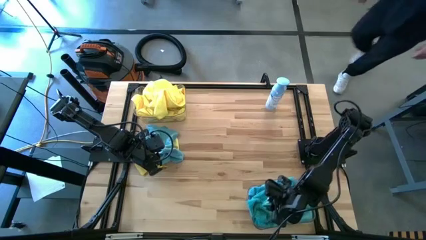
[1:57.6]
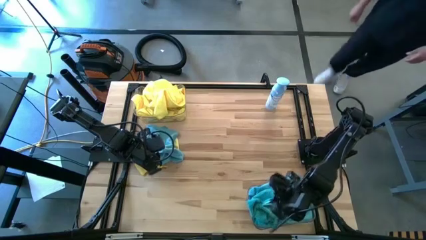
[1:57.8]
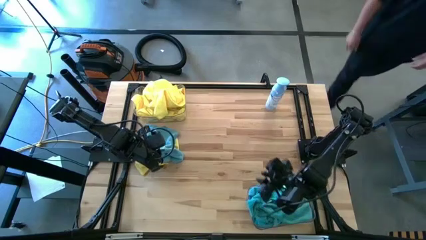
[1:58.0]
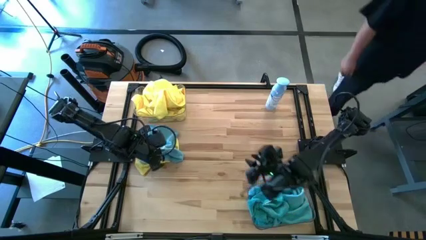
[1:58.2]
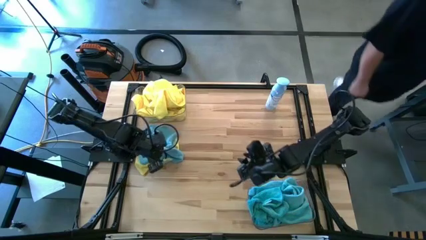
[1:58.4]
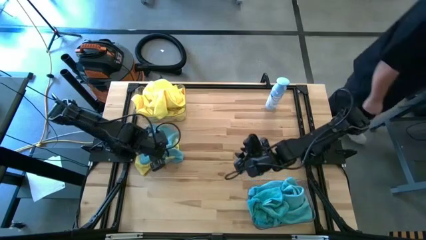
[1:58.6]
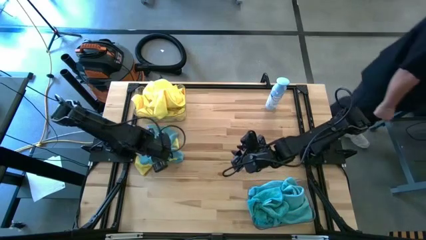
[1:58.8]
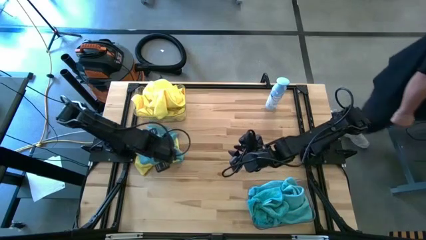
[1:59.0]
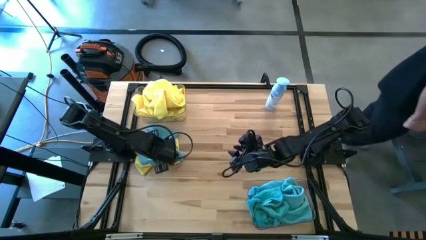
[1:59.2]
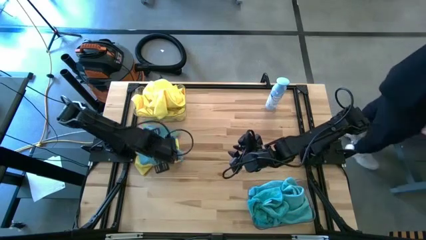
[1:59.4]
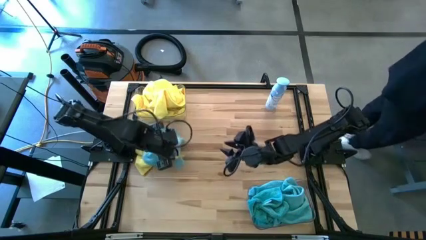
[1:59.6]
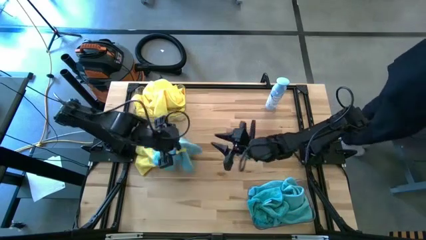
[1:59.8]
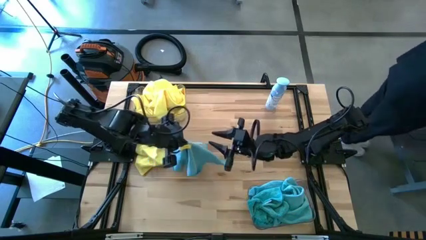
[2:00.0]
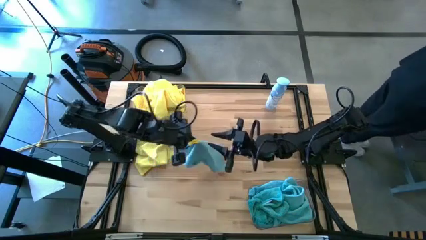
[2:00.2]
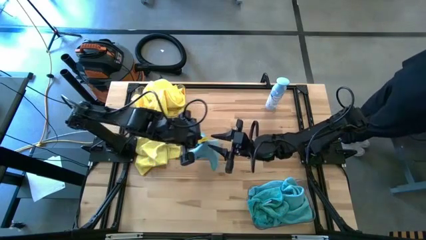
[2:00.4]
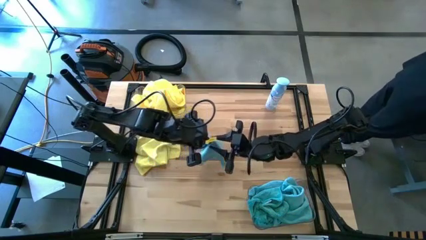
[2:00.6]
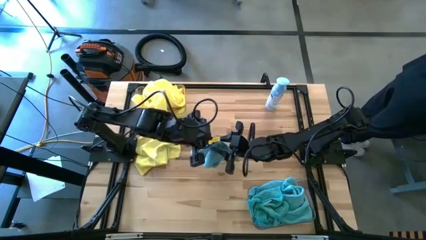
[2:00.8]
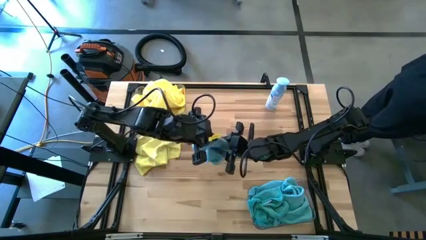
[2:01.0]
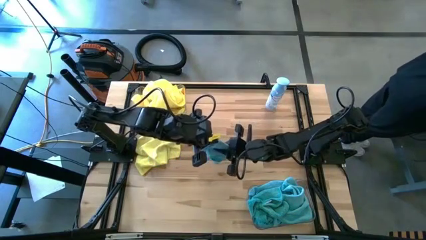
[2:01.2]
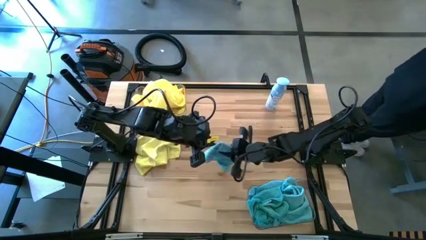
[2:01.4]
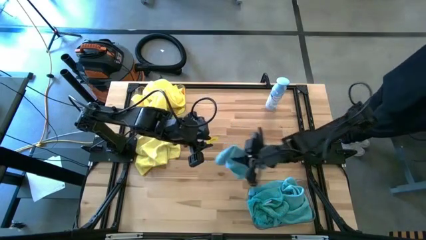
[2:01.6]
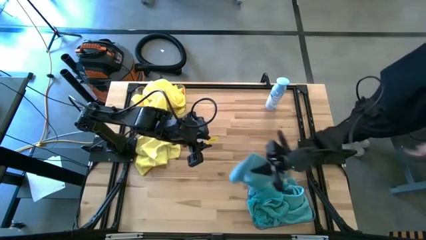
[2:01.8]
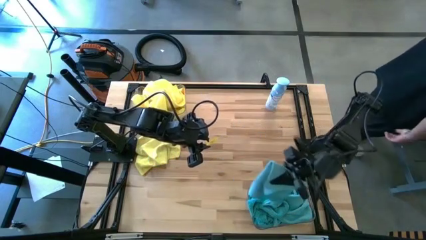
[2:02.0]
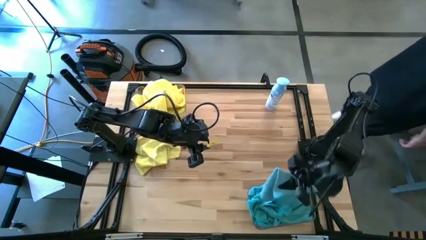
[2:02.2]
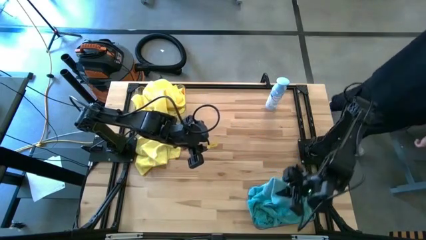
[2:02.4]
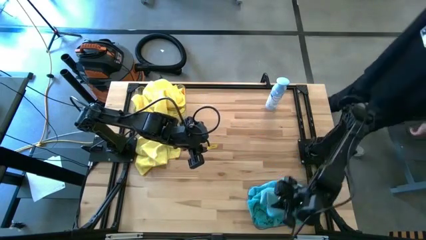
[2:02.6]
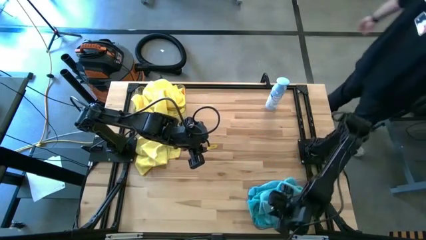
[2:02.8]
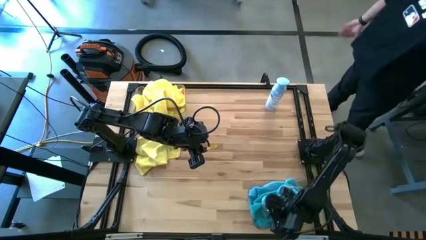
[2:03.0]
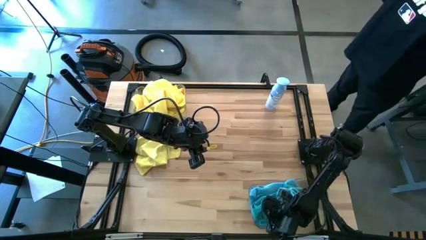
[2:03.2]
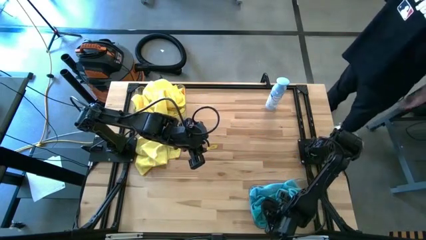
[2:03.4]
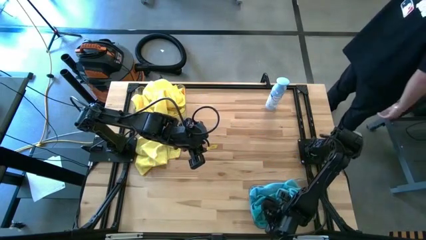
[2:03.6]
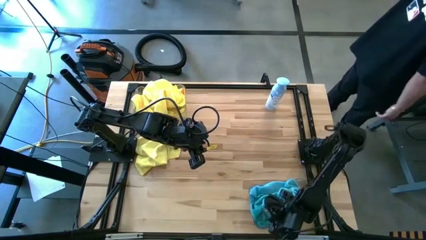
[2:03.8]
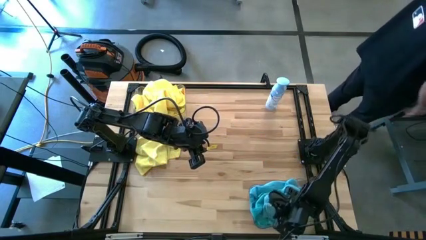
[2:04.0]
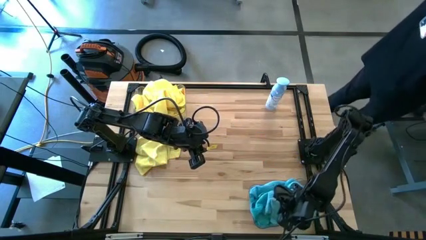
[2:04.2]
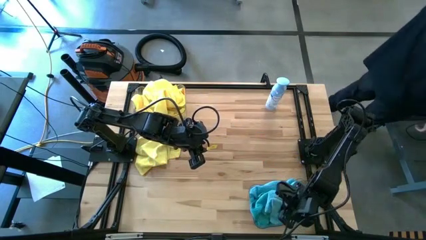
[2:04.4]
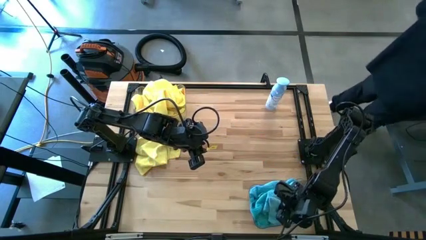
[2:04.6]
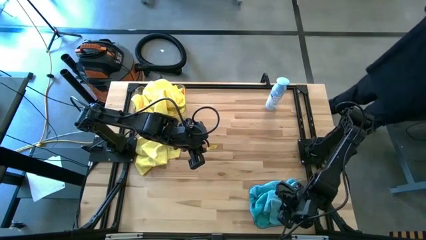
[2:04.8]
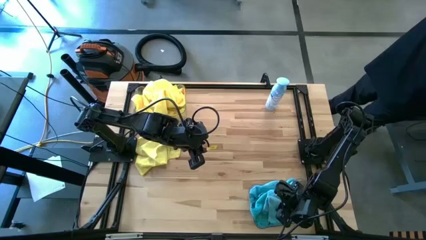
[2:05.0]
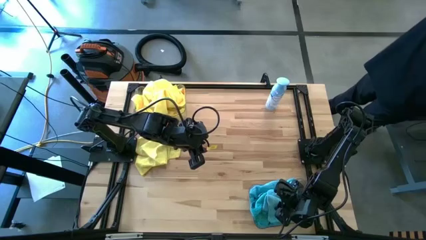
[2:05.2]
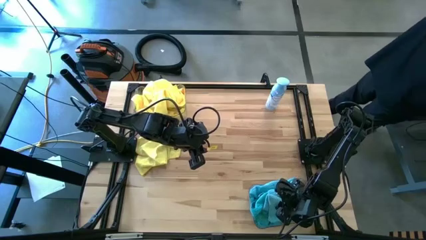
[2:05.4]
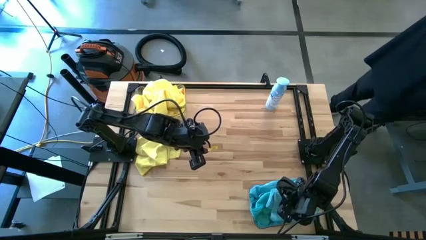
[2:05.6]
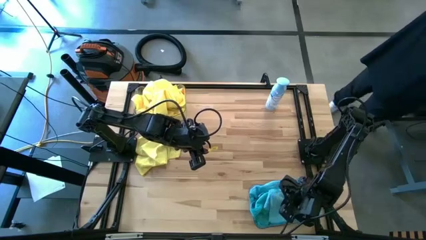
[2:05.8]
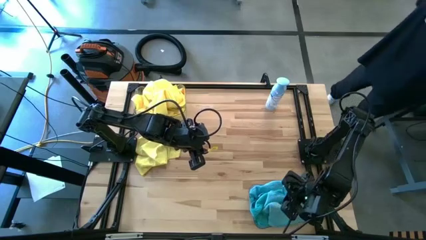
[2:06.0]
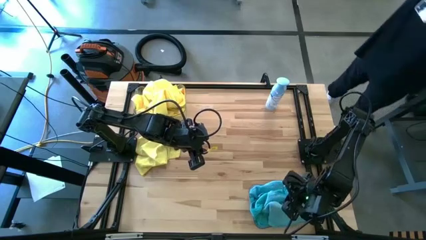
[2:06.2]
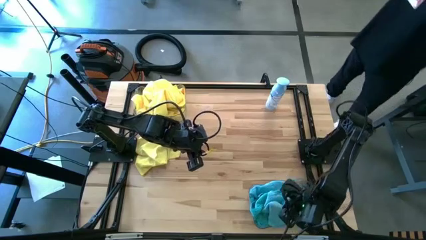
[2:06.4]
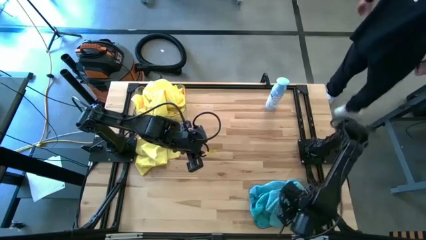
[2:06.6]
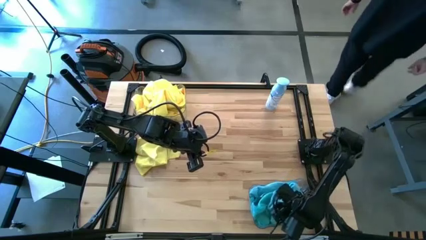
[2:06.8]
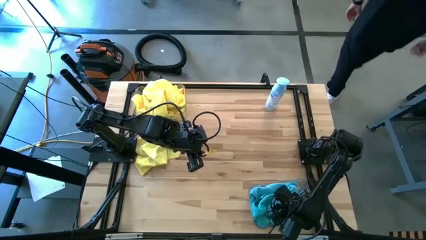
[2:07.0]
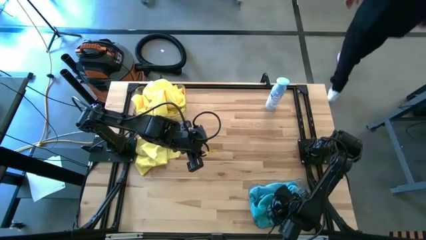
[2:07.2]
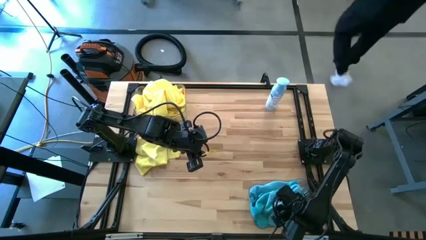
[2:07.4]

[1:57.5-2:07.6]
Task: Sort microfiber towel by color & place in baskets
Put the blue towel into the bottom transparent bin

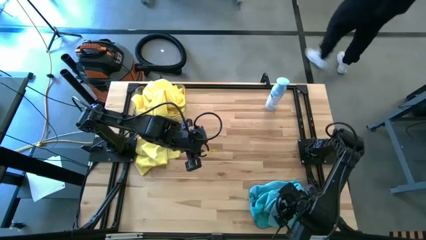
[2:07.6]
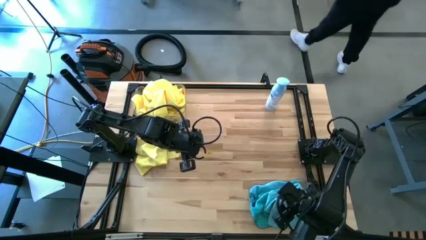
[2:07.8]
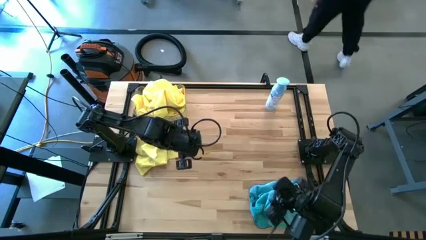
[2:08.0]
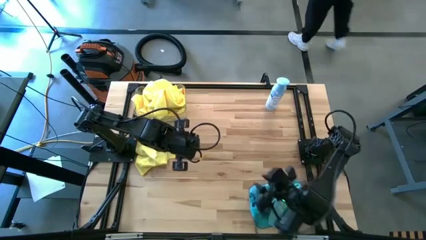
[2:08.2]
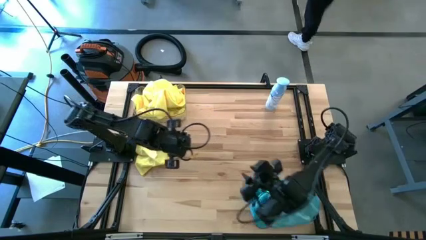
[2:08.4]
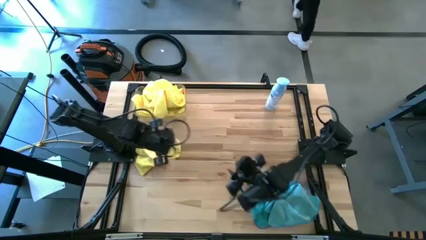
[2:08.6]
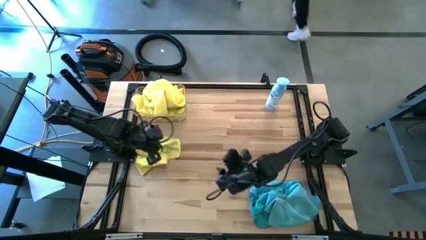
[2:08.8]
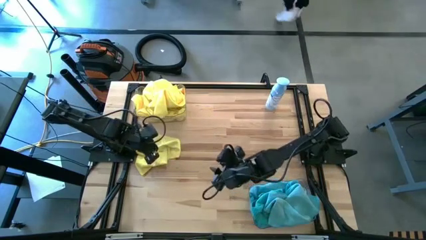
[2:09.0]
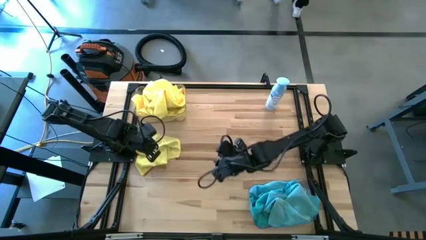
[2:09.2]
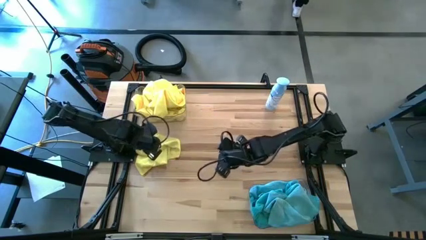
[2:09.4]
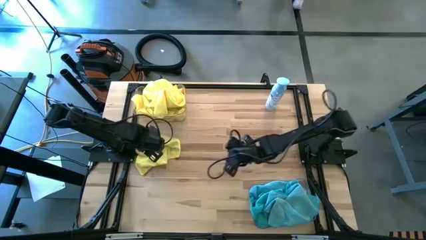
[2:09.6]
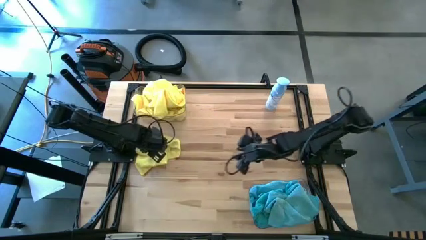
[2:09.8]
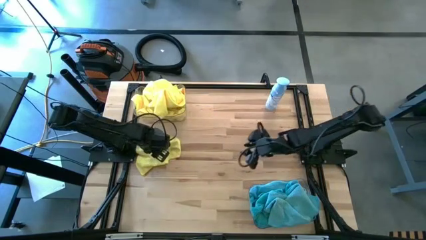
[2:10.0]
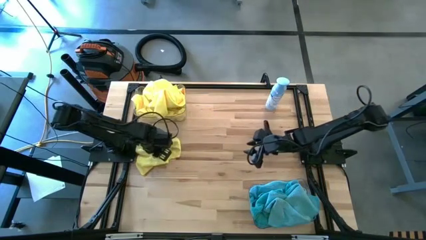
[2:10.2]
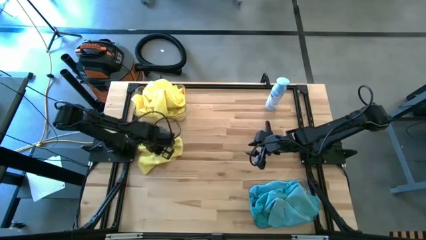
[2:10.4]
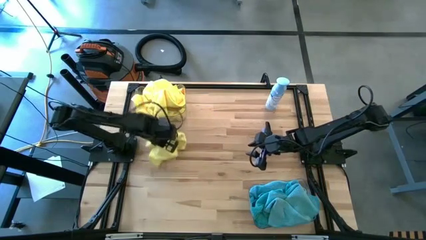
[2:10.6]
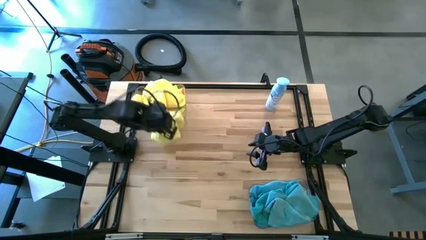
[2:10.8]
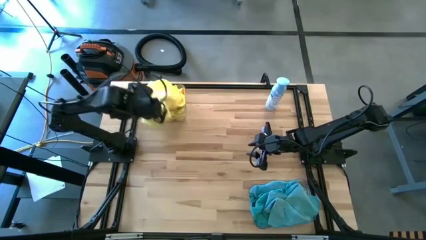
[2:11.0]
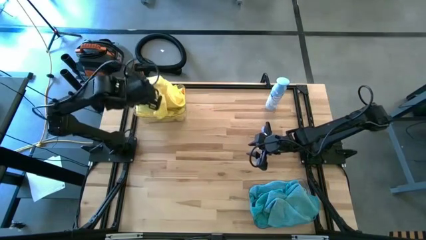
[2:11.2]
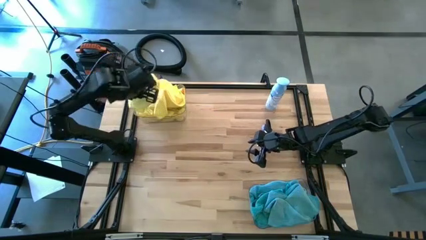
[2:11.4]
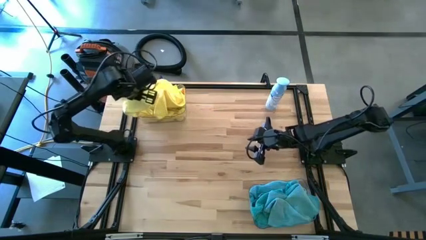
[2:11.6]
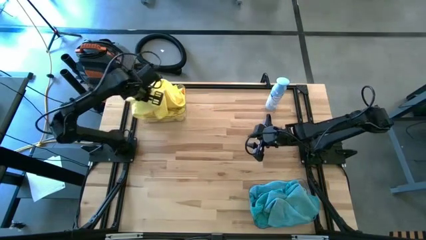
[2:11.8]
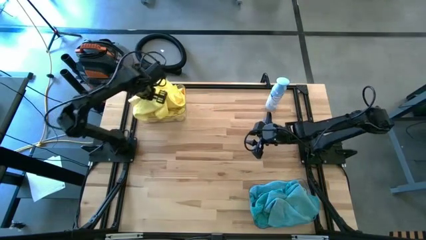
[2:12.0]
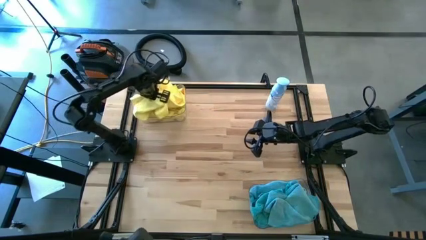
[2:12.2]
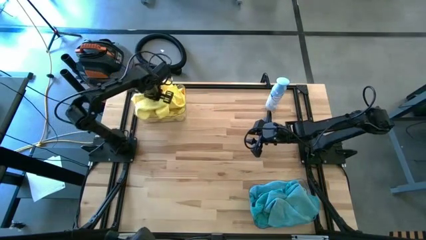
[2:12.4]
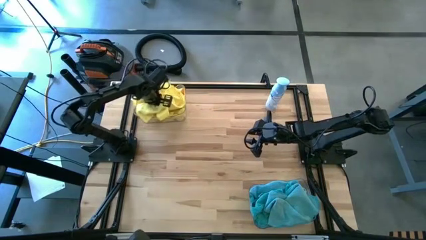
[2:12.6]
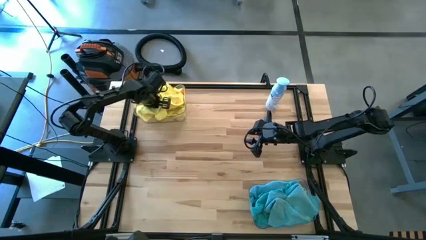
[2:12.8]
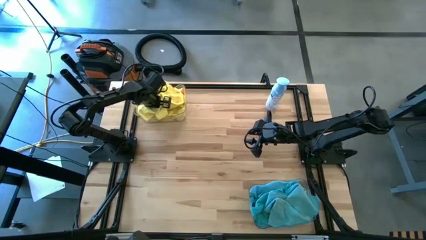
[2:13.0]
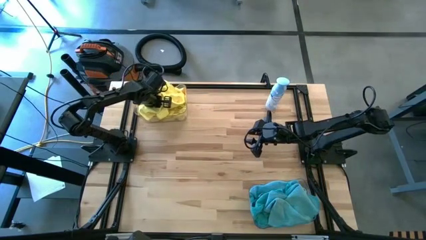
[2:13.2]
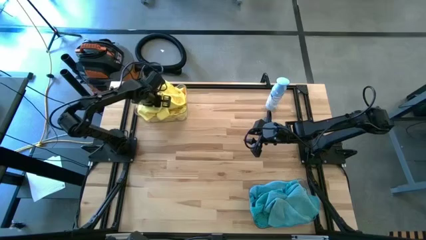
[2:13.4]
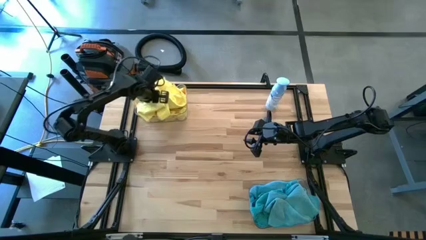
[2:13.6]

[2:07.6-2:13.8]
Put the yellow towel into the top transparent bin

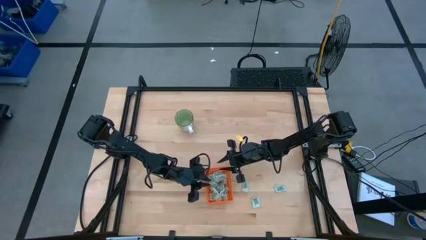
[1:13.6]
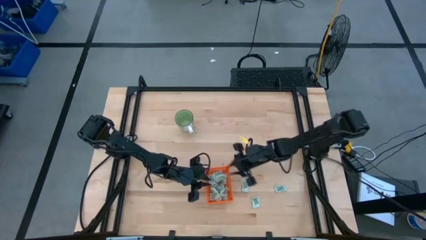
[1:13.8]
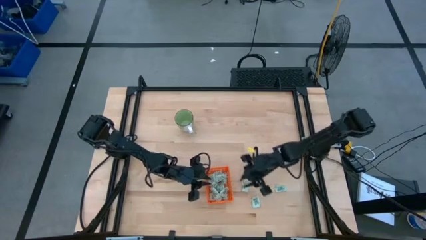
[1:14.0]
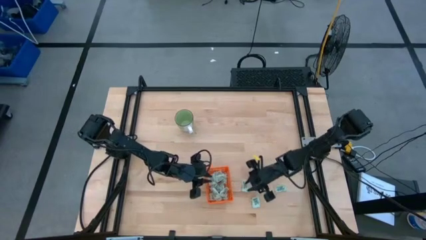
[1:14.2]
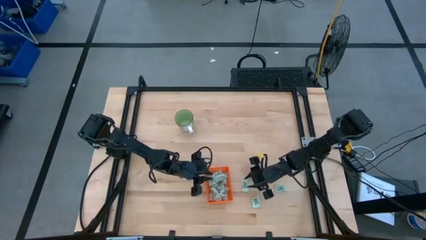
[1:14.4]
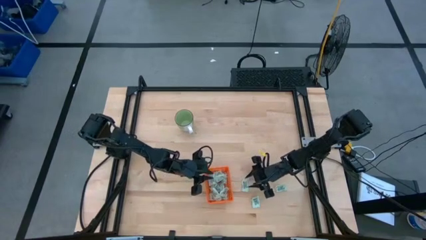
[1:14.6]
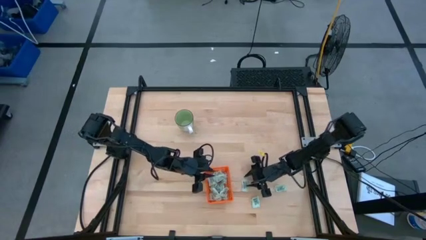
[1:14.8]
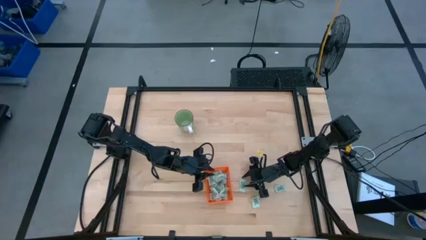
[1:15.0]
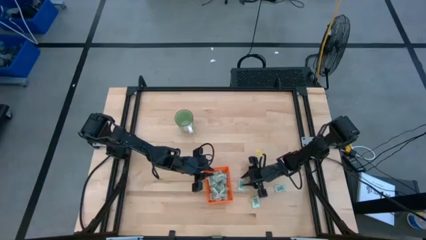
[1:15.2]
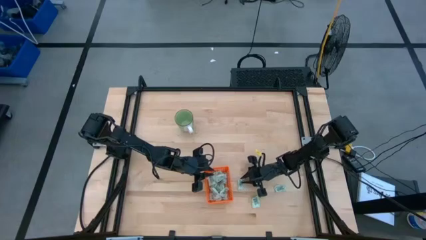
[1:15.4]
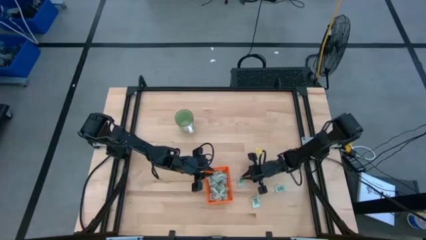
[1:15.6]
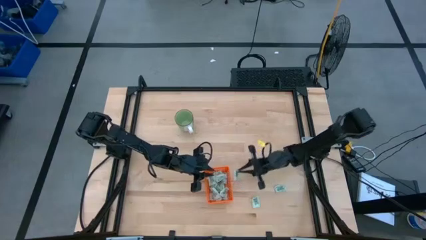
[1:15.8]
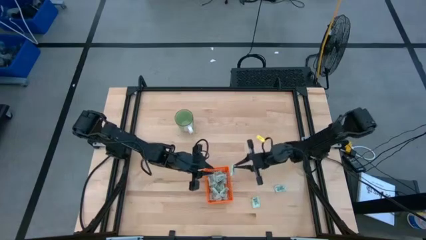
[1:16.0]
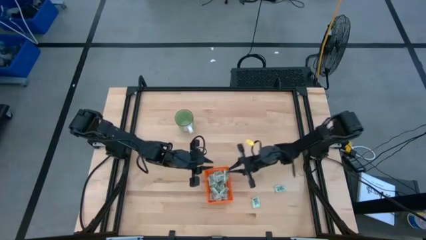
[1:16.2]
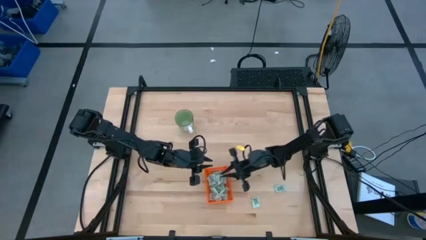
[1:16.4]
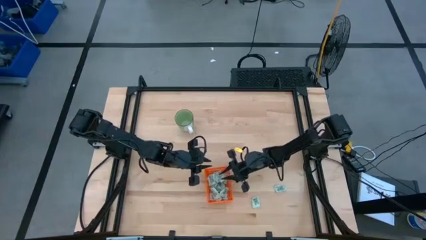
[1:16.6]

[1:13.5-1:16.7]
Task: Pick and place Stevia / Truvia into bins
Put the stevia packet into the orange basket
